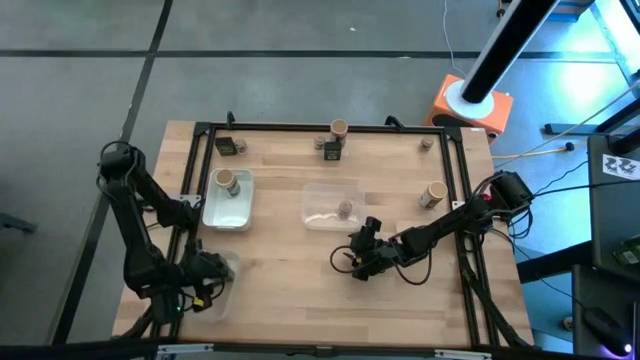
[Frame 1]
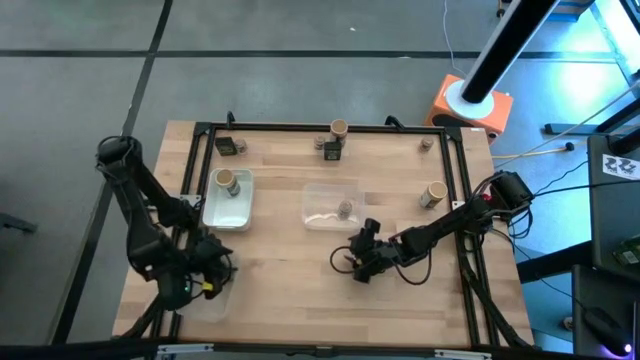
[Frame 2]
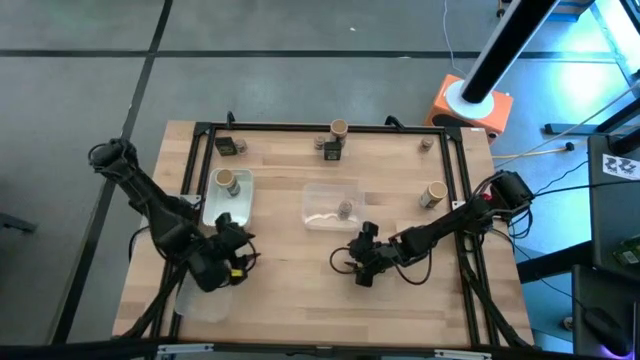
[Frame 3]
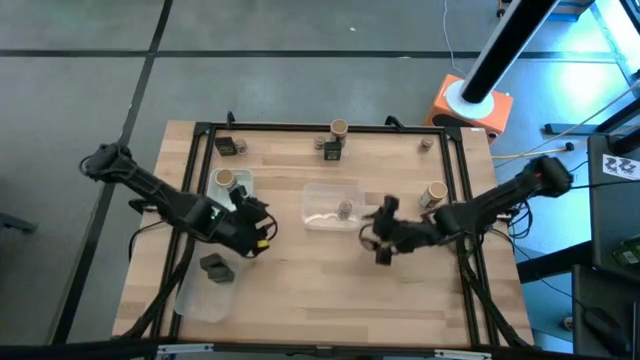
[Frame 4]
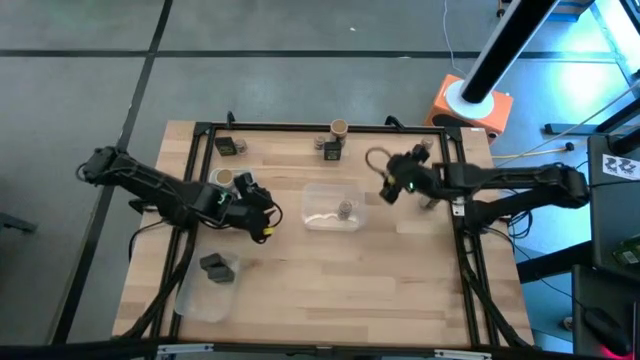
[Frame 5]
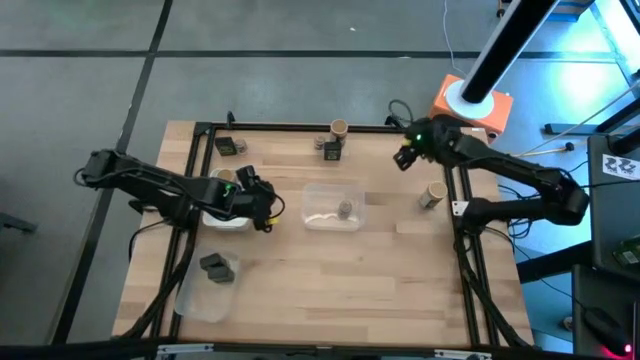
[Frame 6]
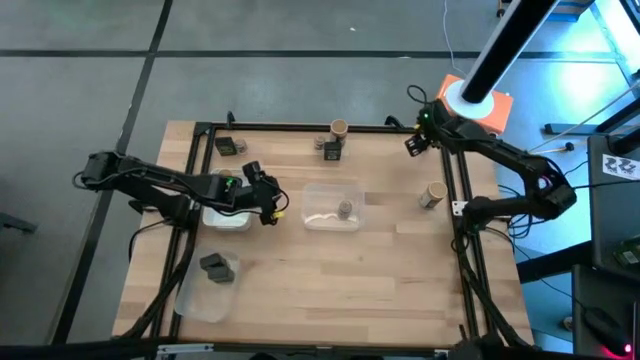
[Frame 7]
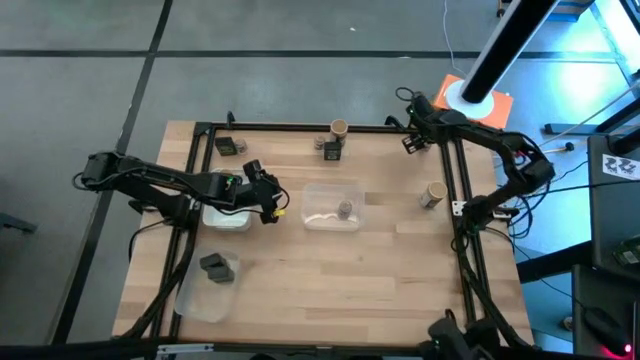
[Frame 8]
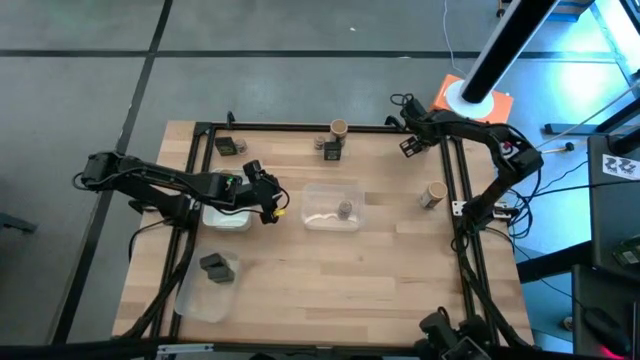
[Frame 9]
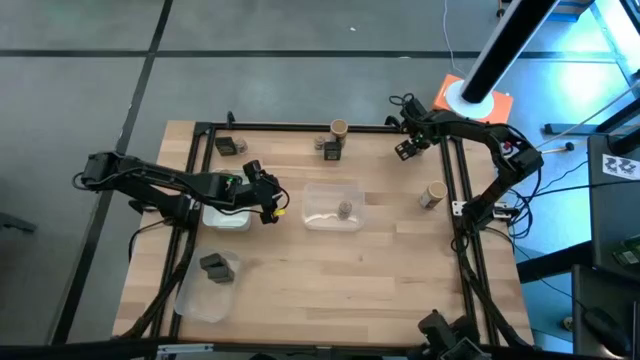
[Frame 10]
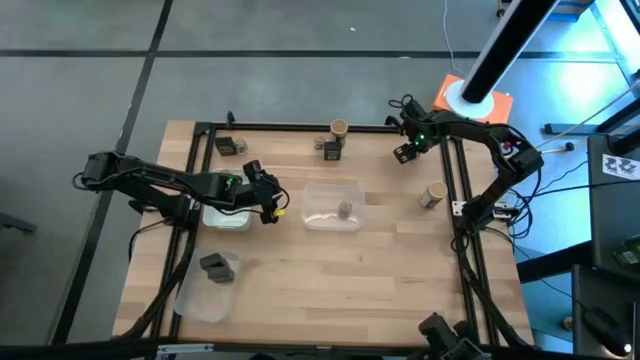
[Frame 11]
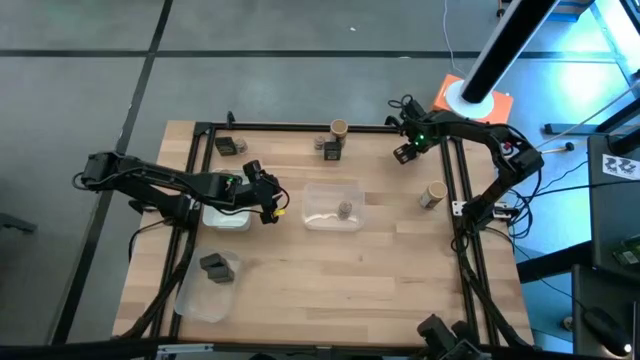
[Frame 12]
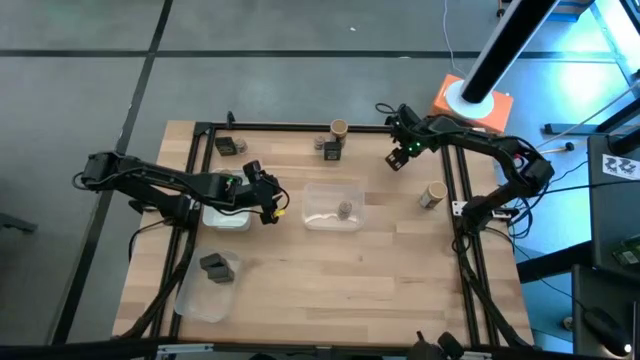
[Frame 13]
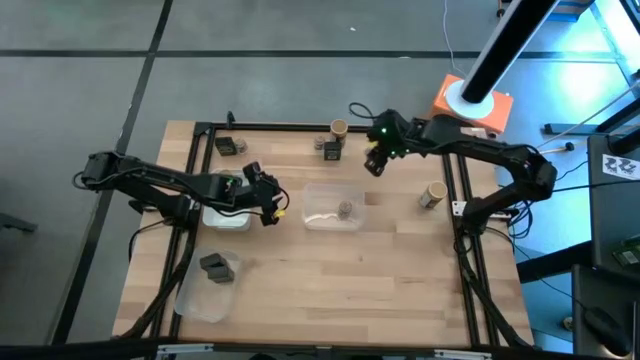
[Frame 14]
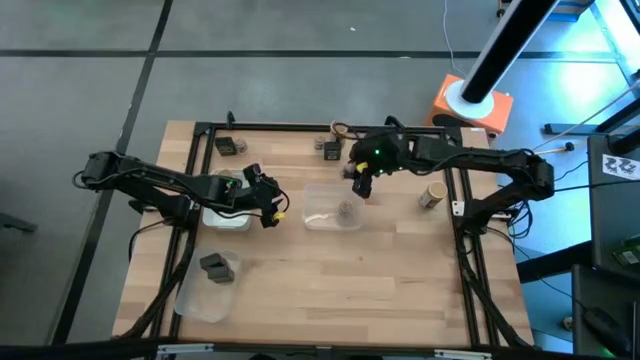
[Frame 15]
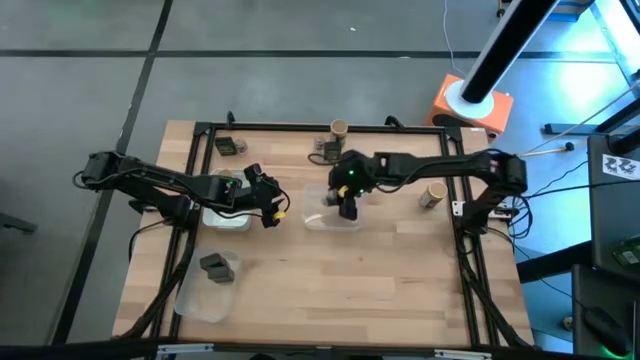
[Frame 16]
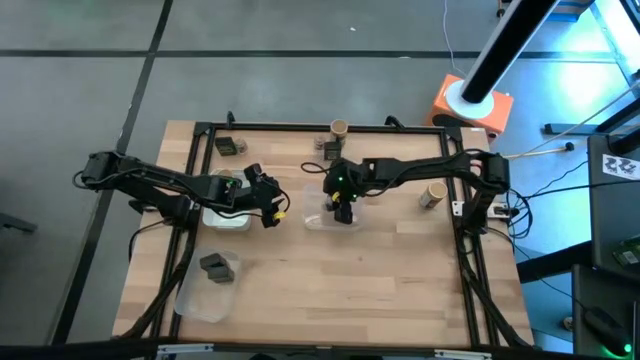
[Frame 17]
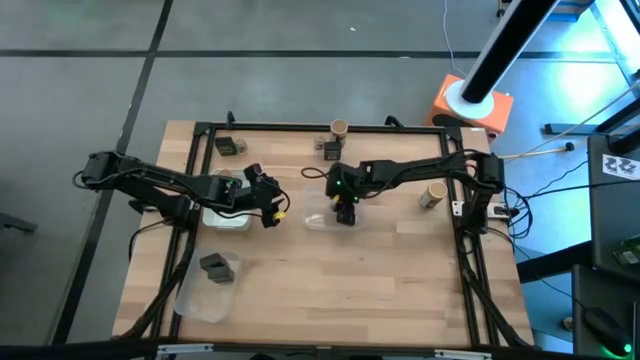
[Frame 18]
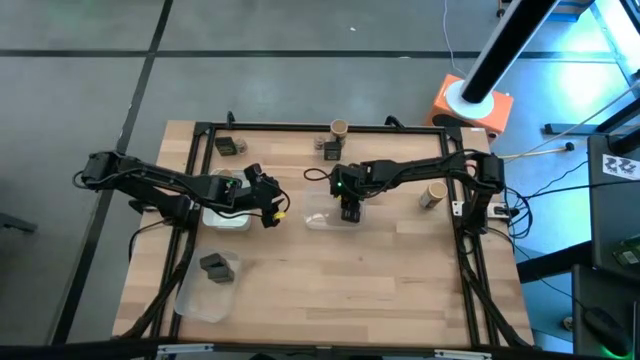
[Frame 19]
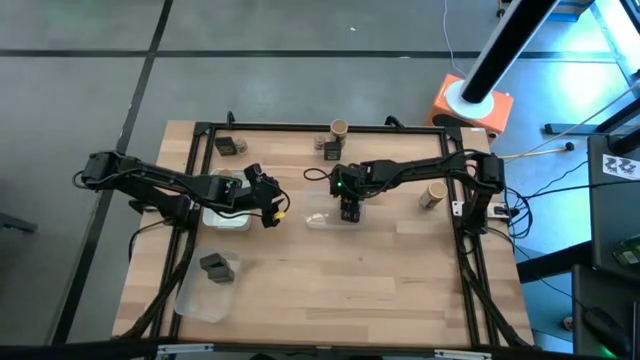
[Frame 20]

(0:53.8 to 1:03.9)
Task: Sort spices by type
Put the brown seasoning bottle into the top transparent bin

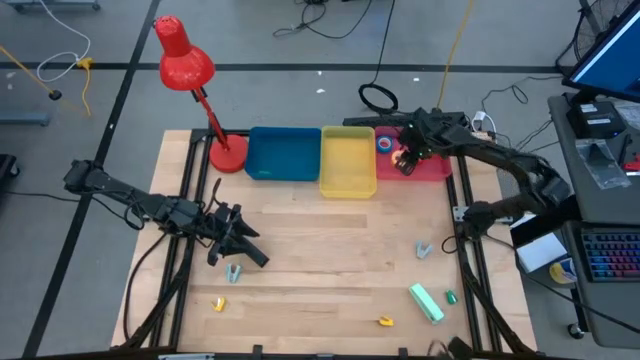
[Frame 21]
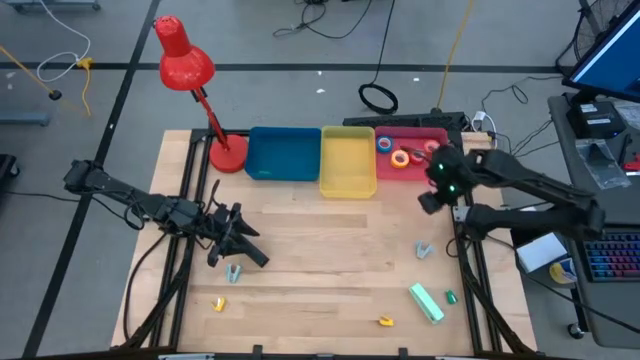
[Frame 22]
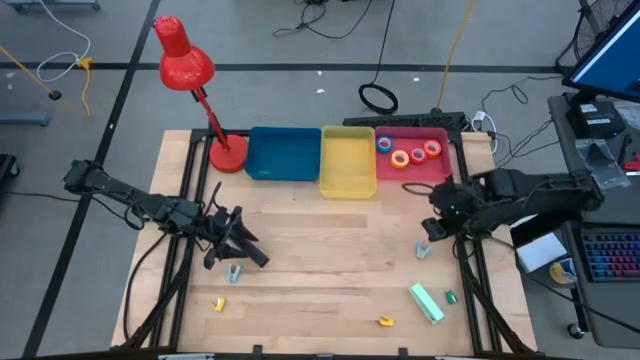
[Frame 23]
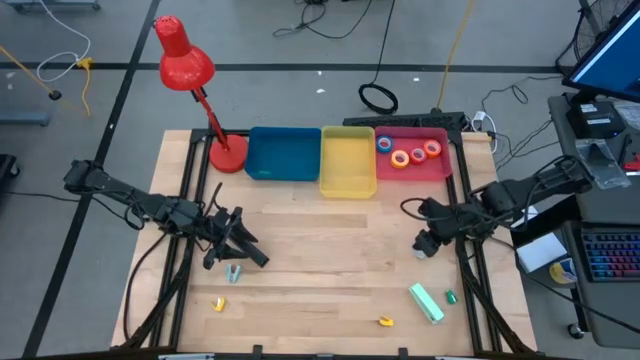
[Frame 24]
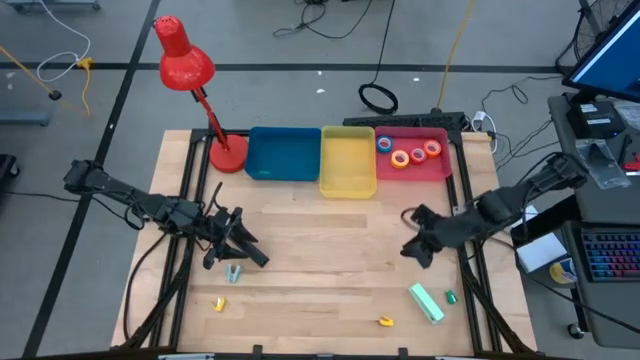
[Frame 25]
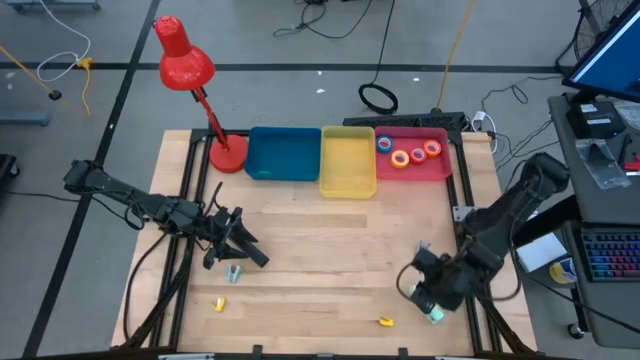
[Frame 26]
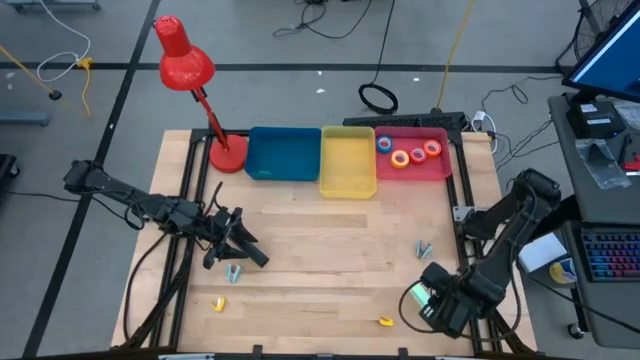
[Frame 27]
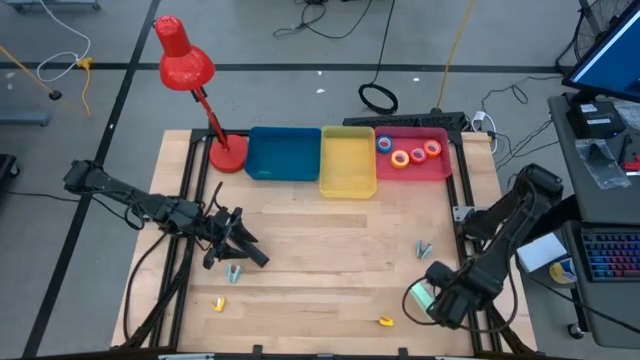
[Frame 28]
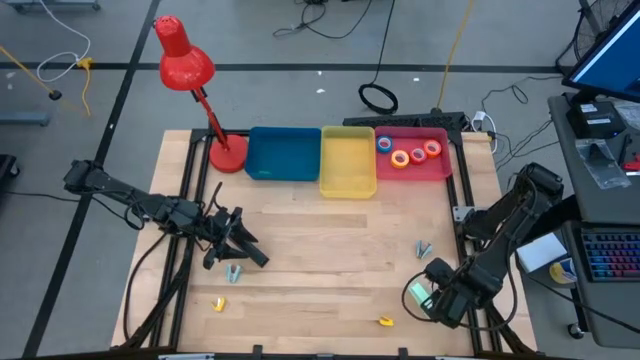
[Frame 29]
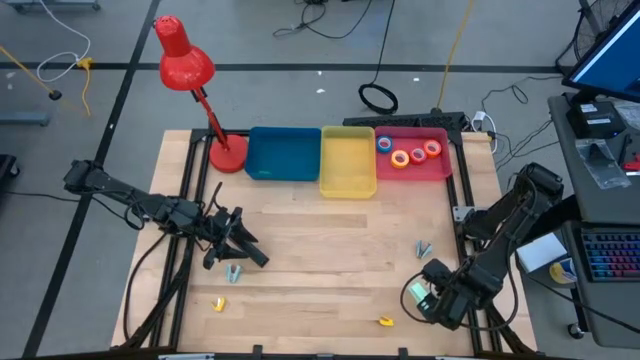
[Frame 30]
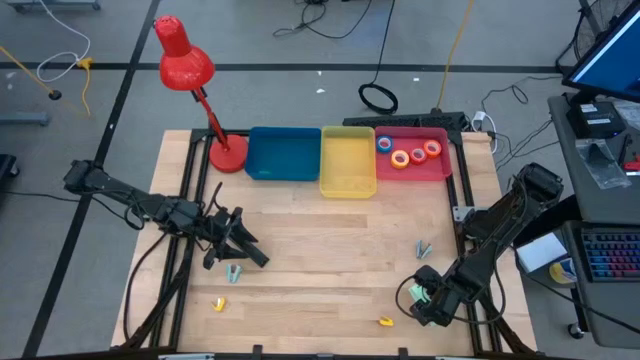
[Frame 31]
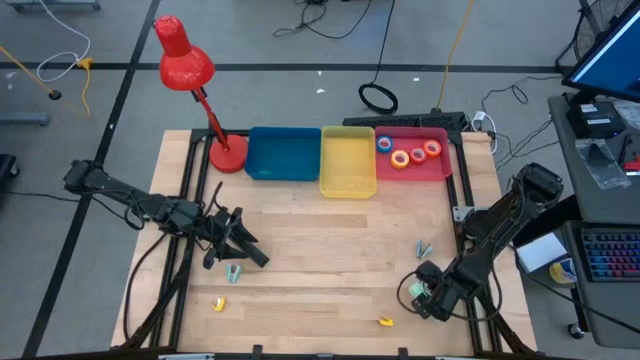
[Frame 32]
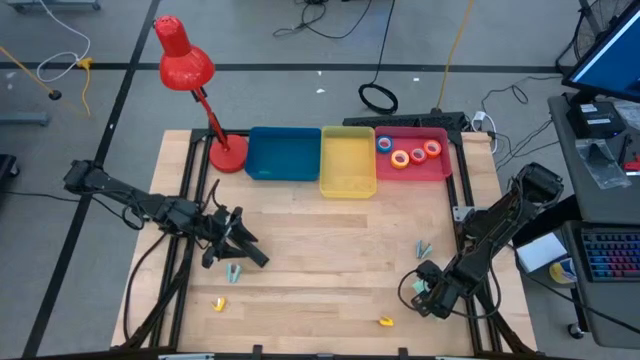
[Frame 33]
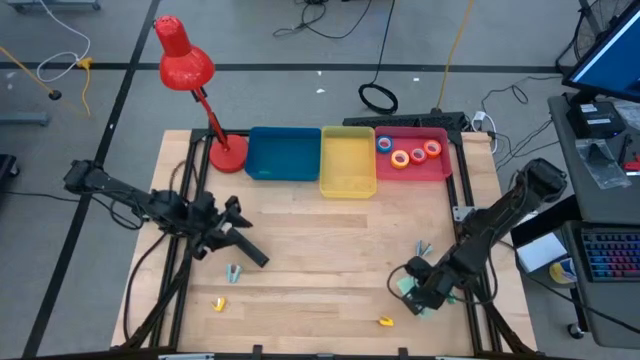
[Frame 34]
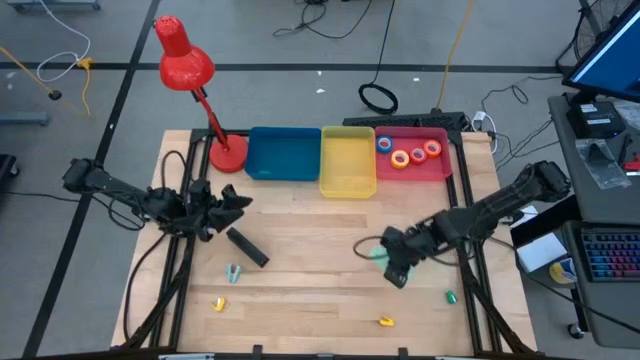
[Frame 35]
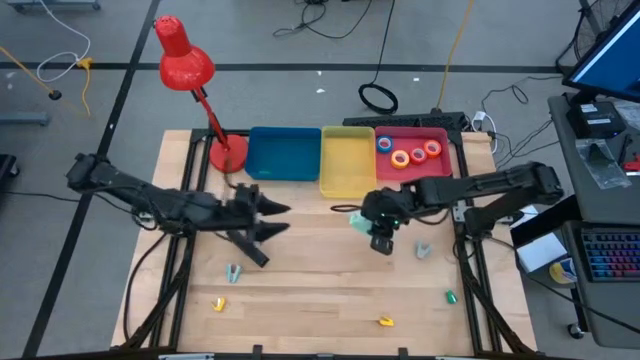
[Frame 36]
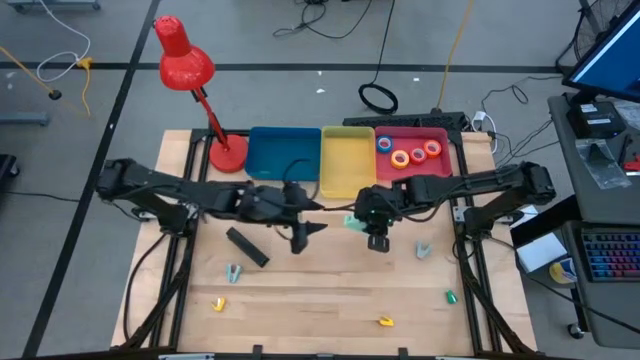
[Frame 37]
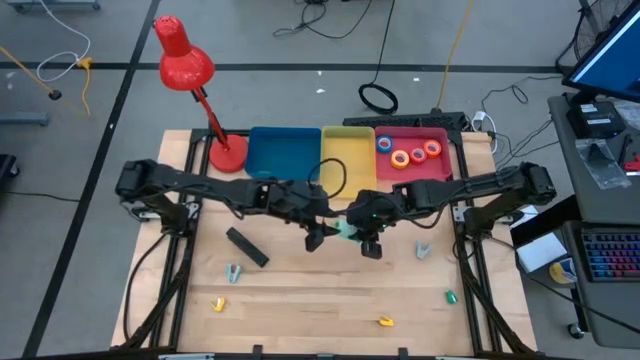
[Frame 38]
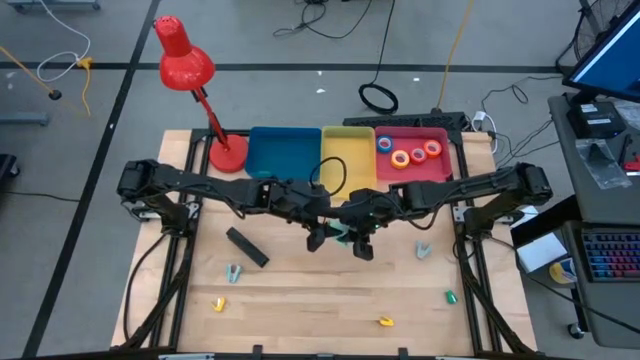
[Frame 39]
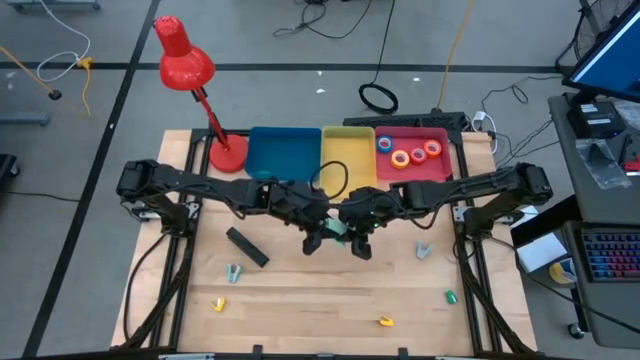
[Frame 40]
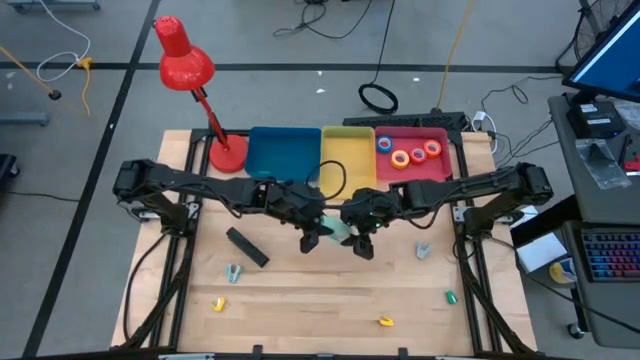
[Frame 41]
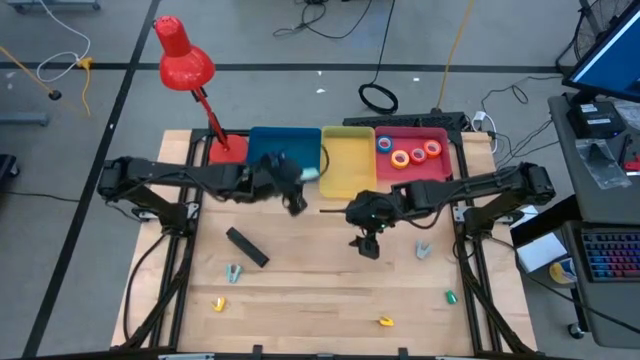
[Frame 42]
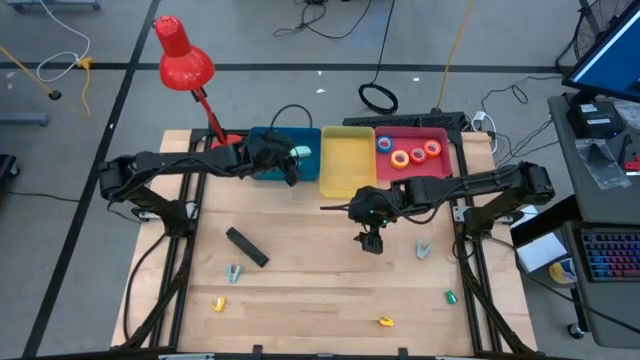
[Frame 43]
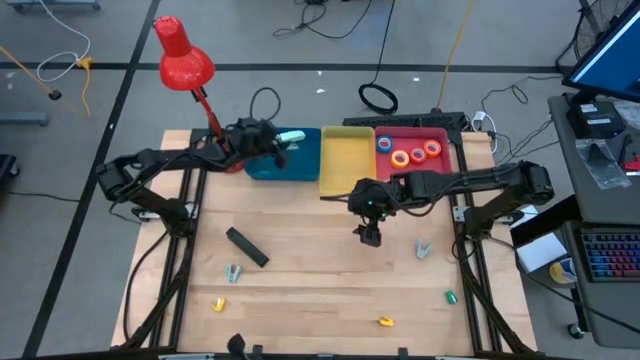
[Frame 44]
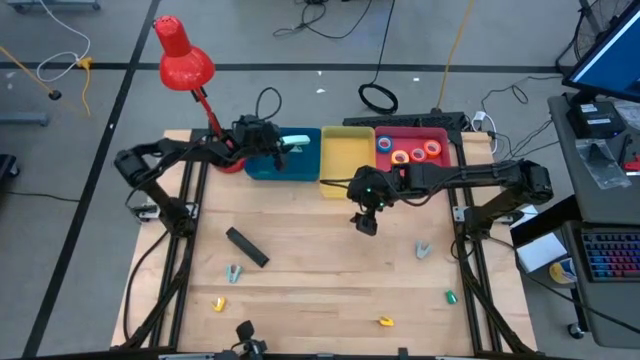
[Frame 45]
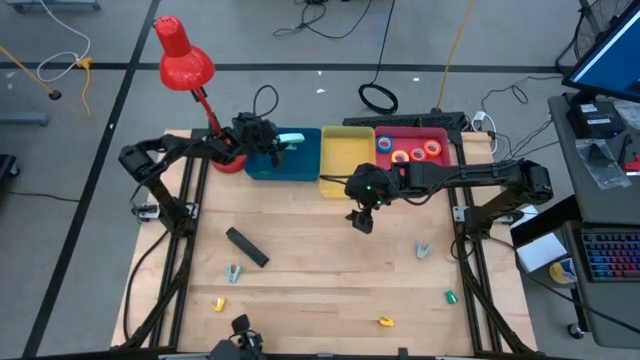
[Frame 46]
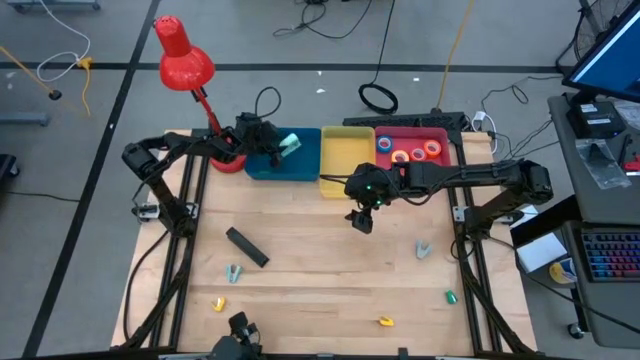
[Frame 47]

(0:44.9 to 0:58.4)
Task: Pick and place Stapler, Stapler remover, tape
Put the large light blue stapler into the blue bin
